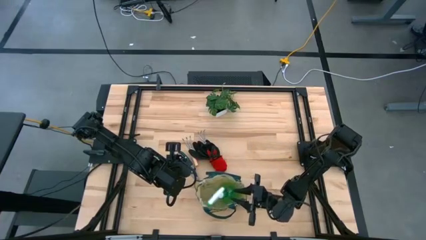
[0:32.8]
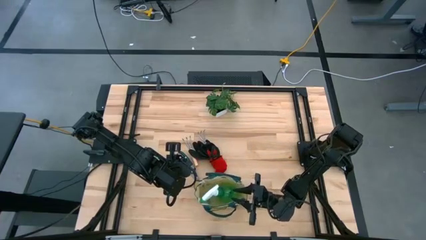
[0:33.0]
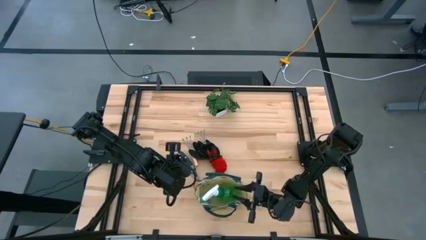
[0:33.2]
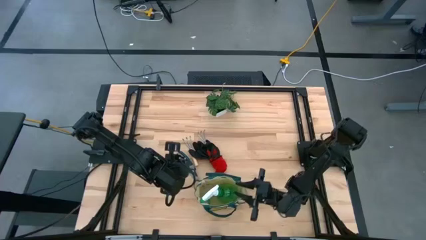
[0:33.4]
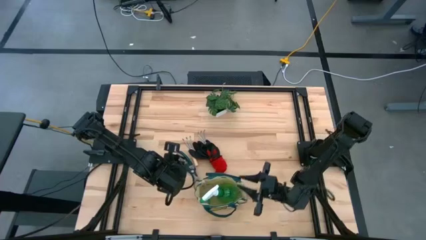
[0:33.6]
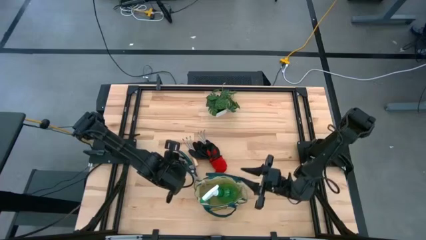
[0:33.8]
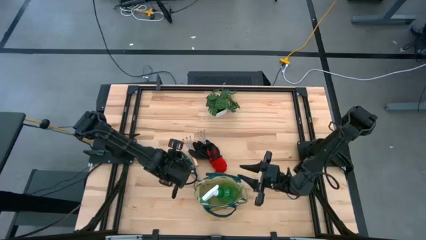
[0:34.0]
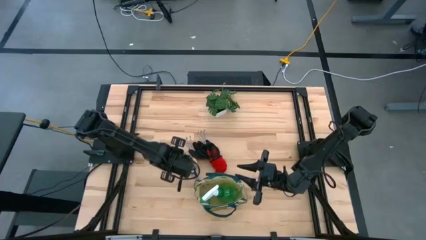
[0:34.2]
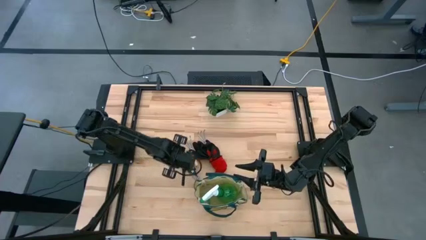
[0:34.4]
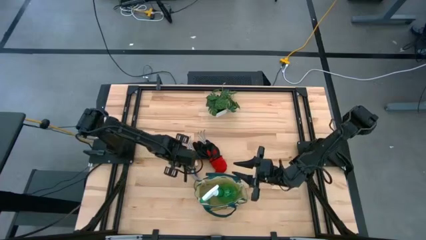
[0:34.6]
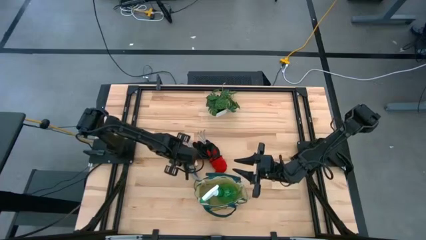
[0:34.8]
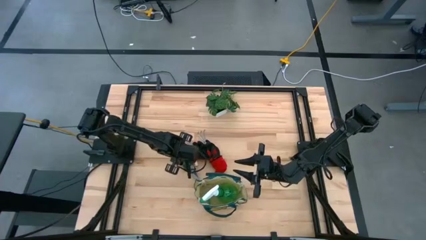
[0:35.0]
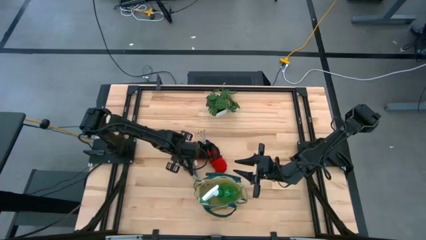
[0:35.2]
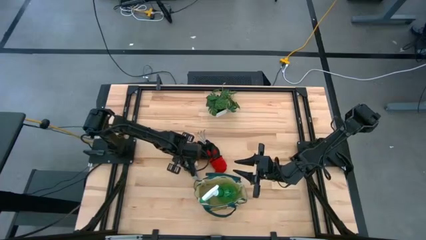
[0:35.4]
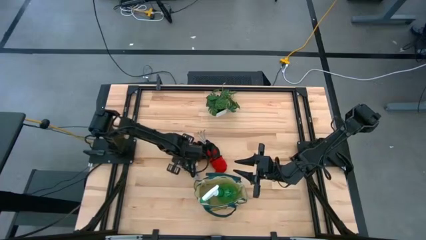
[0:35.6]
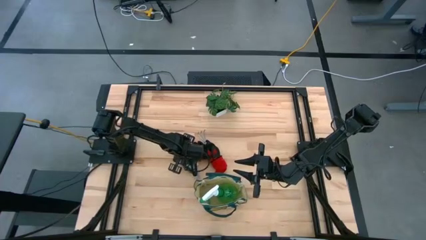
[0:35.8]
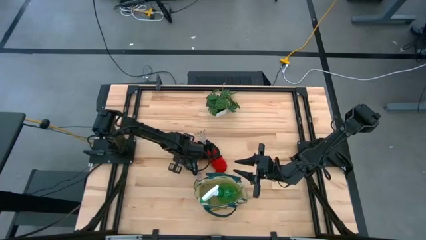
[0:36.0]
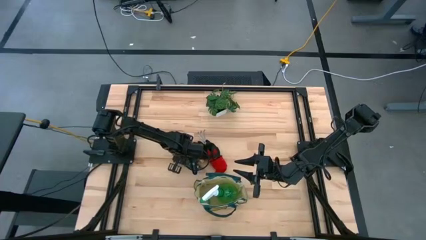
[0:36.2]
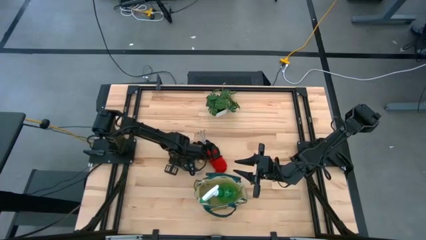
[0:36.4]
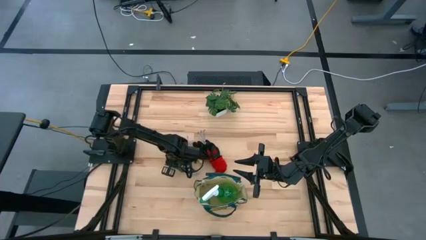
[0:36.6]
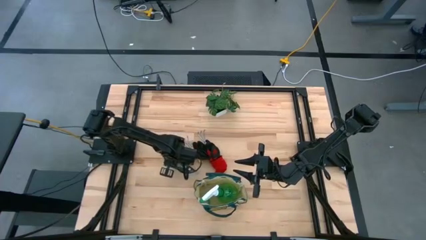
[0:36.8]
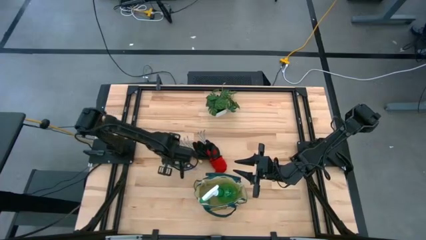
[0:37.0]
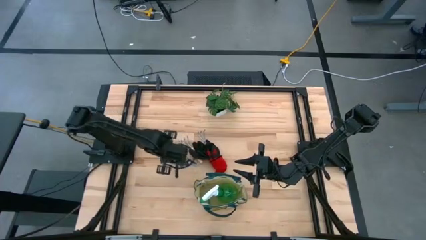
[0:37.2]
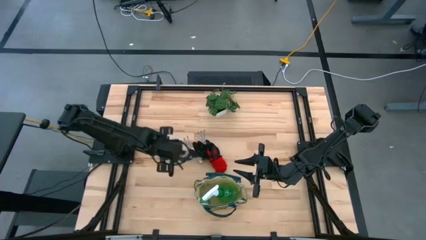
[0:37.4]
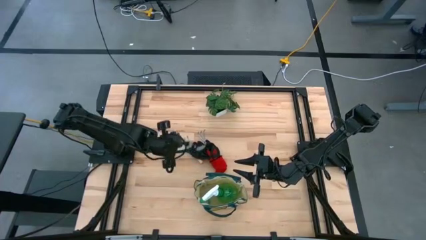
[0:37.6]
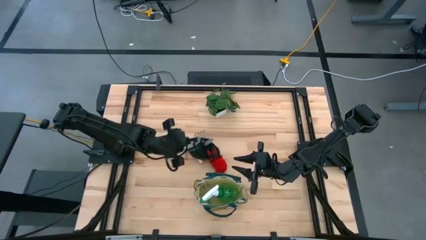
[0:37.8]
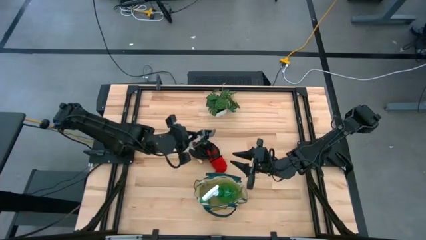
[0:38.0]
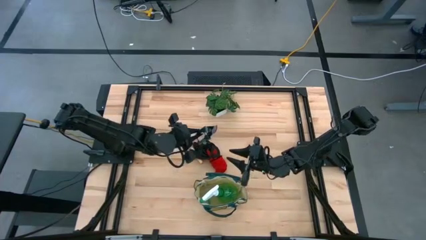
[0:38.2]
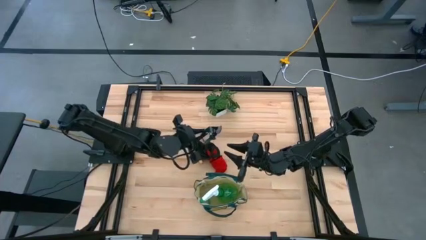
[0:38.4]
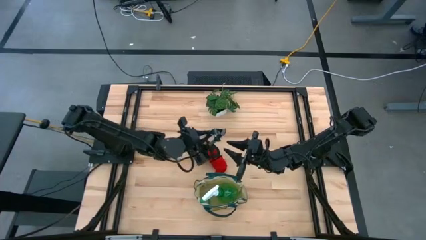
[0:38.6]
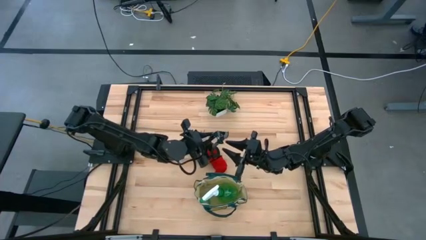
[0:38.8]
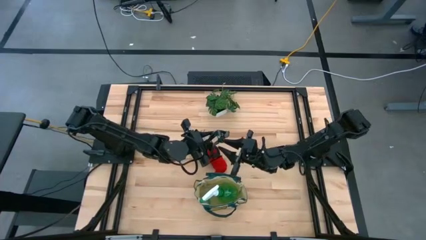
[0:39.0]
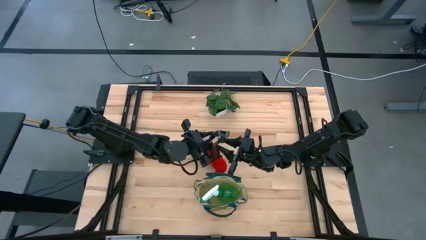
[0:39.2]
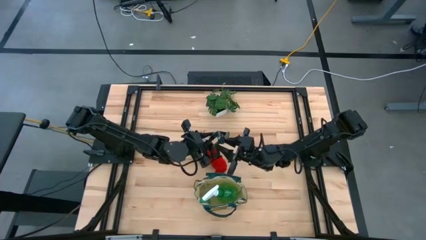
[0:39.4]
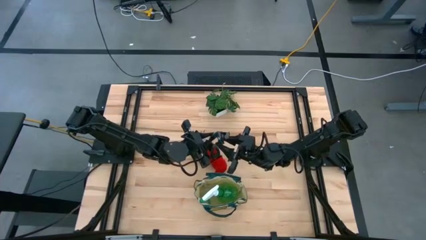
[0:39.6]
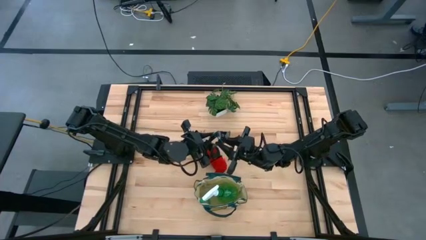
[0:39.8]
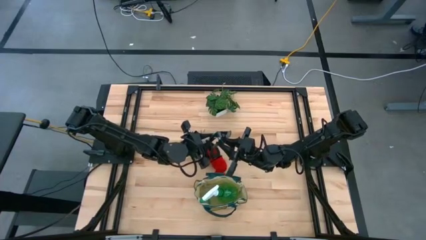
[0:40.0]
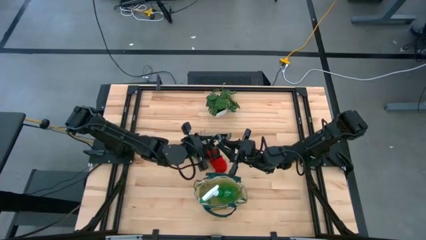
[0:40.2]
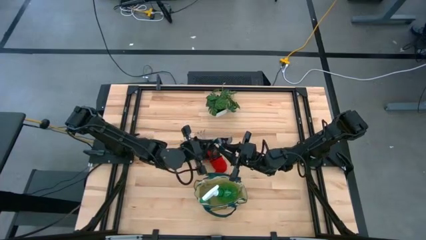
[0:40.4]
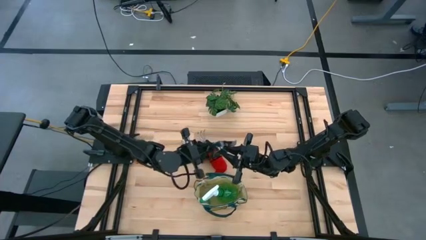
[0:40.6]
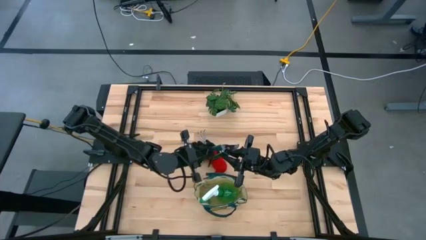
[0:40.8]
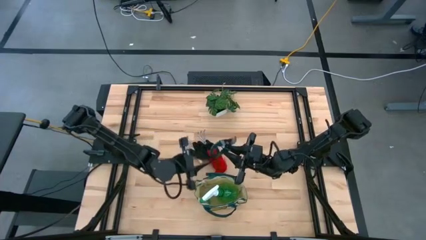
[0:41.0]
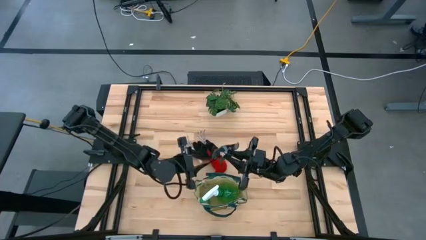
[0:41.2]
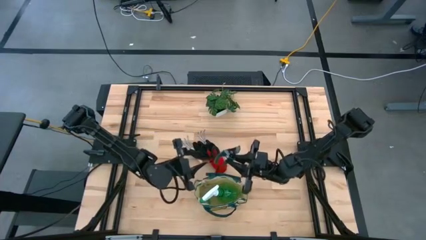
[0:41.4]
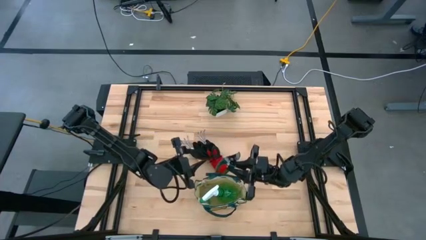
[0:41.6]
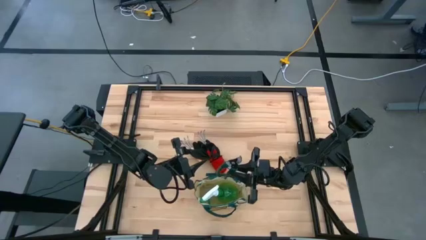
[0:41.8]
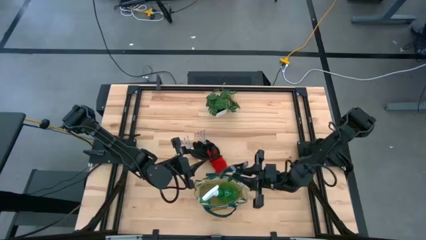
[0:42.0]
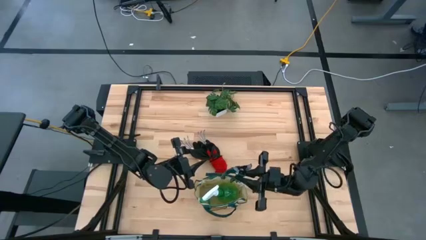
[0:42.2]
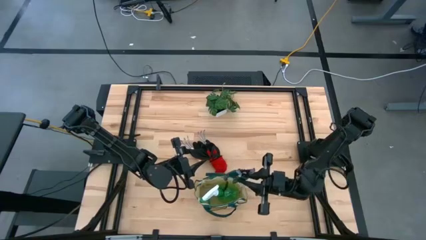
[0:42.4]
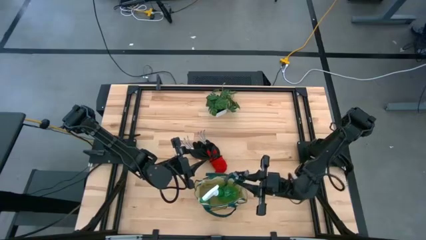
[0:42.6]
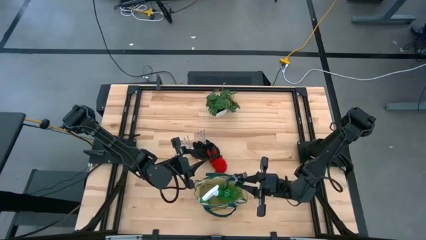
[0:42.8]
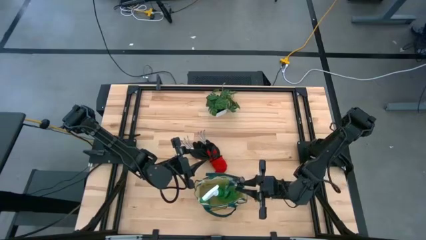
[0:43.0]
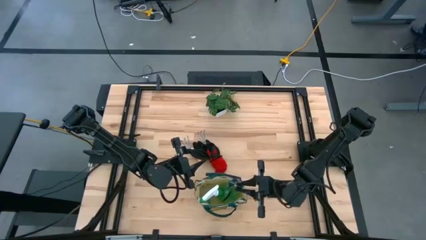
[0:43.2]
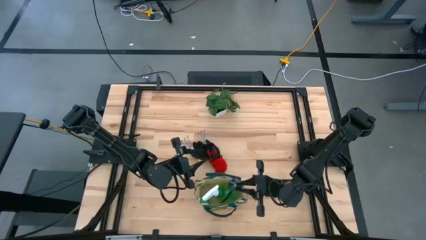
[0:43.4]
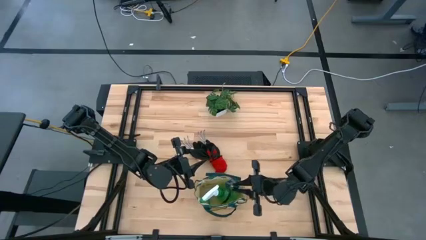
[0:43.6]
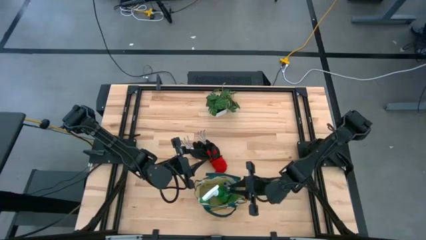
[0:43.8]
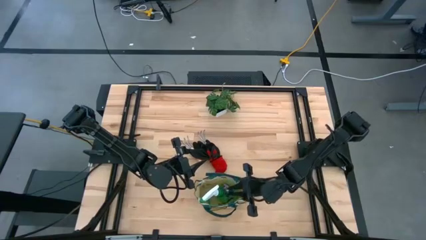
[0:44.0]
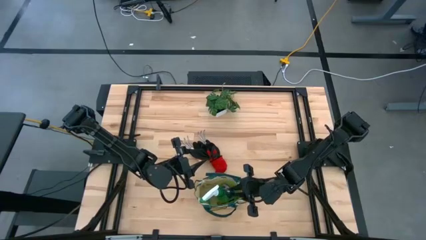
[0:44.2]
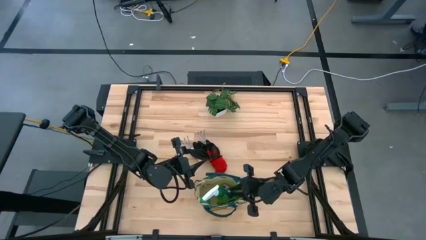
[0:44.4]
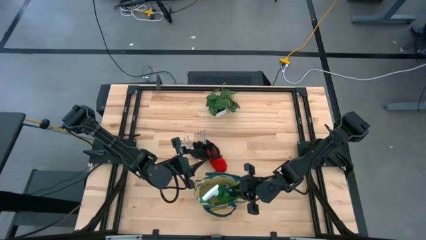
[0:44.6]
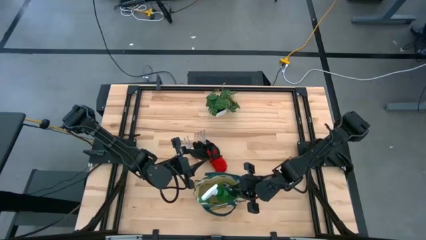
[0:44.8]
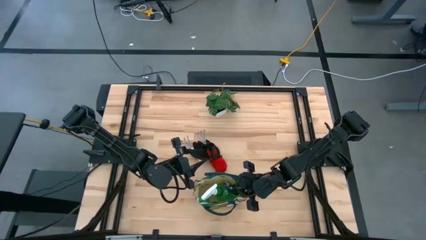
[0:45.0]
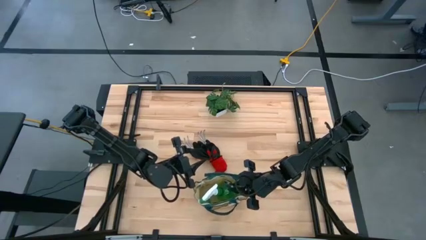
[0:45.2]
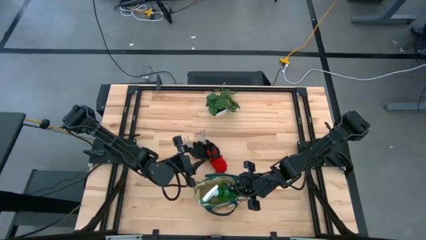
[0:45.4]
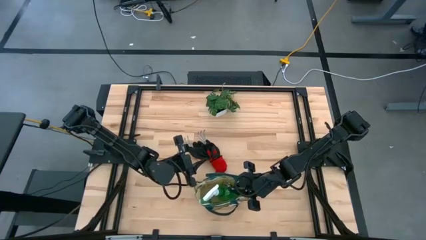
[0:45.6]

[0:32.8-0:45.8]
Task: Pick & Place Garden tools in Gardening bag
Put the dark green shear scissors into the gray gardening bag

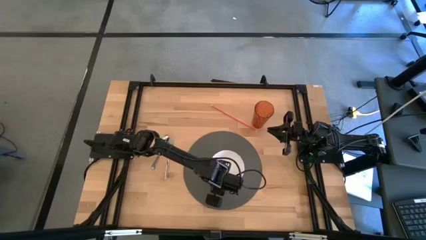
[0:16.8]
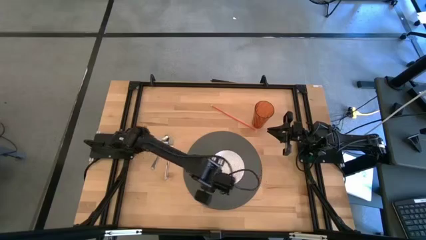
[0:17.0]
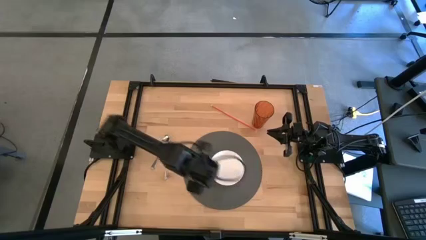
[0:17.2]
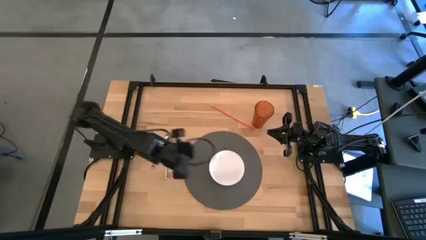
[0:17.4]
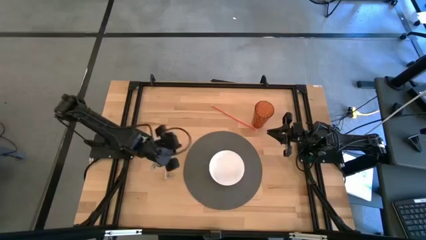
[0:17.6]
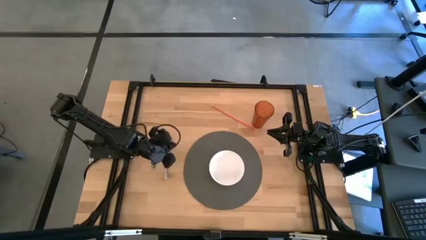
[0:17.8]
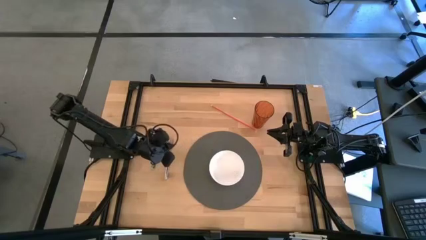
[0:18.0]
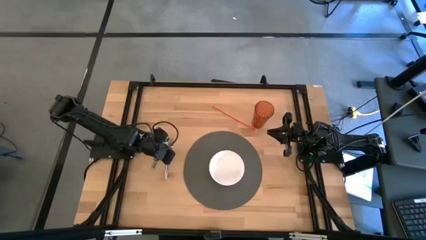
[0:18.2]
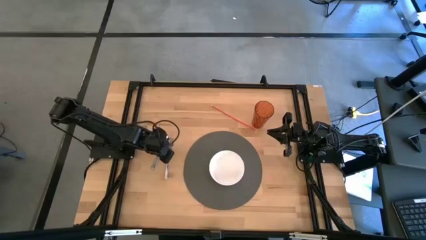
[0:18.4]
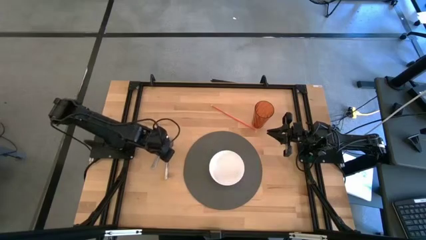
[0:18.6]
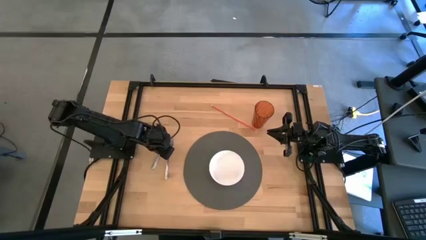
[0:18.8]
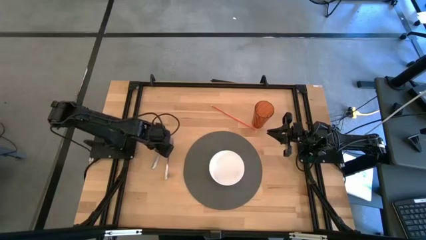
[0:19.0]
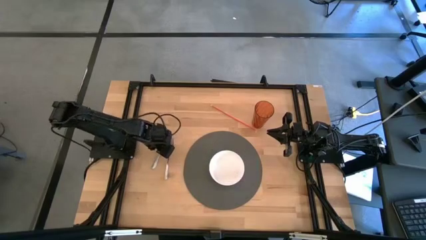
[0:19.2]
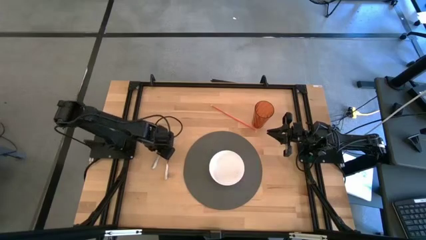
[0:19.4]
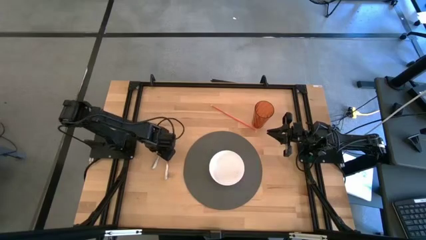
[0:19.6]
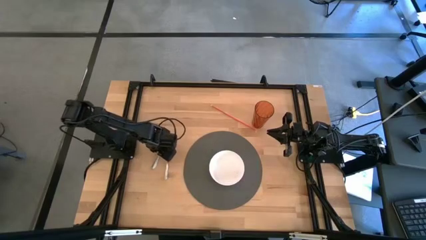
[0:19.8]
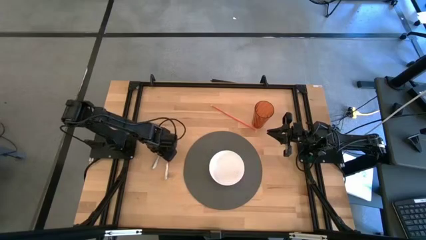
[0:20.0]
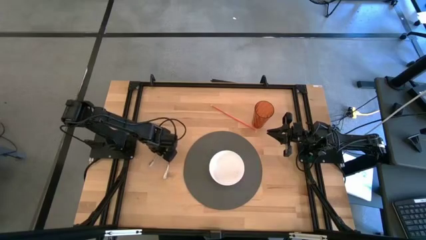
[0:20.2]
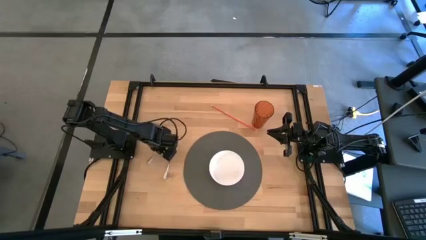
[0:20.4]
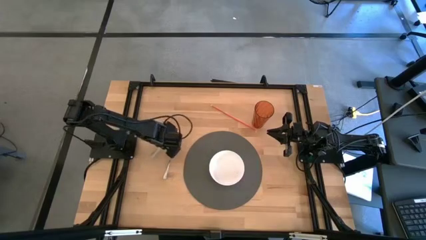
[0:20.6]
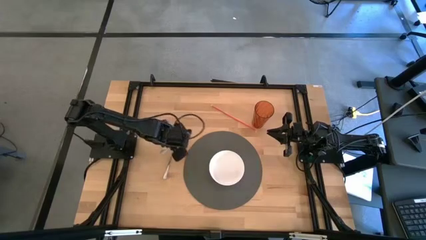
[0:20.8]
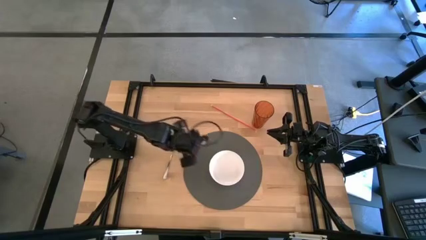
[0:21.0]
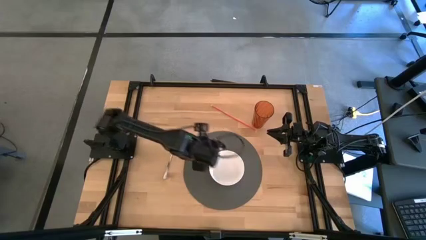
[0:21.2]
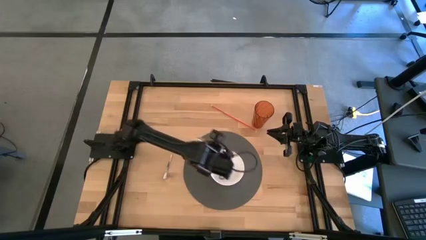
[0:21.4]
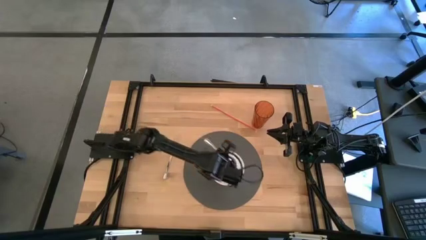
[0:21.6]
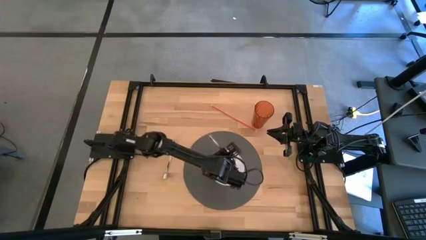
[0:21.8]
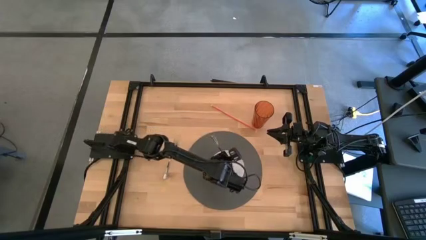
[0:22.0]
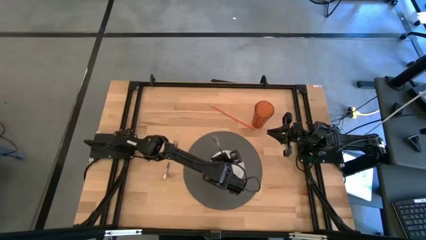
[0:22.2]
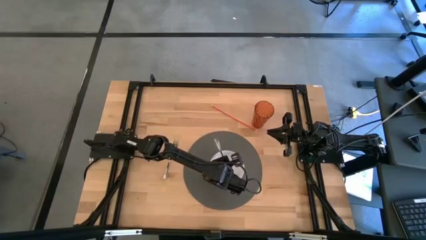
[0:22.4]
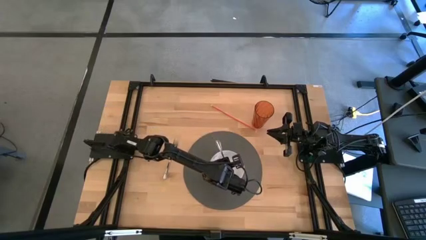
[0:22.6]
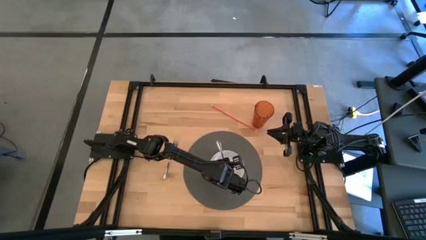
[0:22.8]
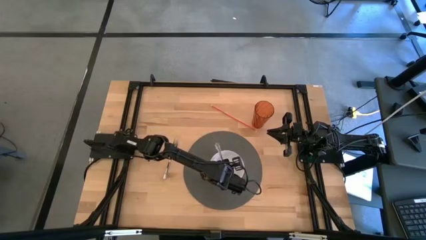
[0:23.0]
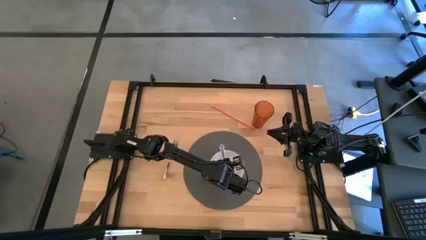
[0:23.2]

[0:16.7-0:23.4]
Task: Pick & Place Utensil
Put the silver spoon into the white bowl on the gray mat
